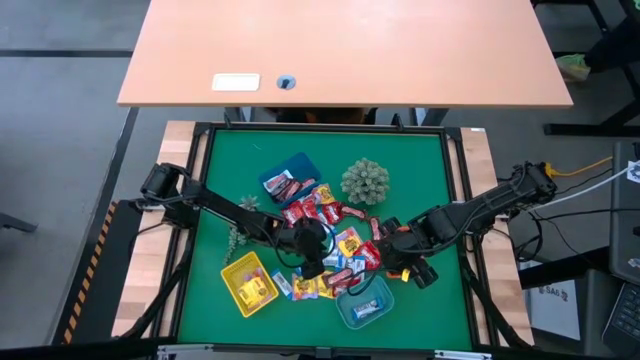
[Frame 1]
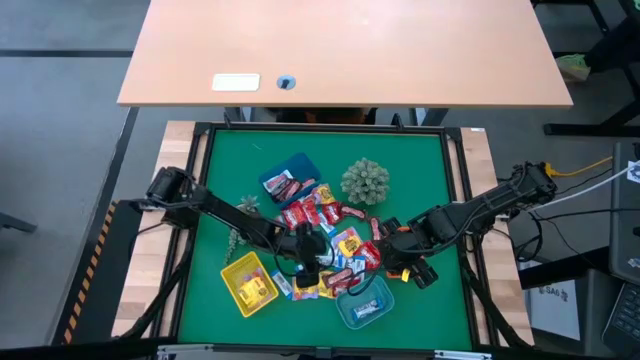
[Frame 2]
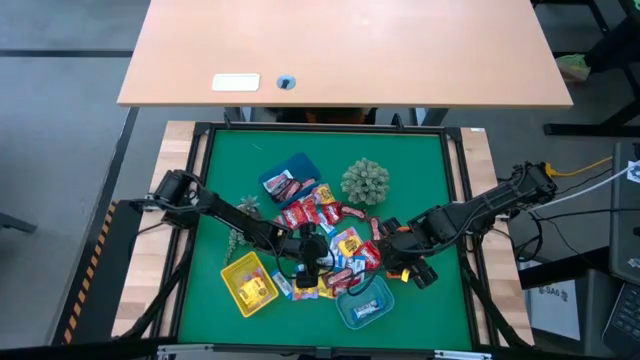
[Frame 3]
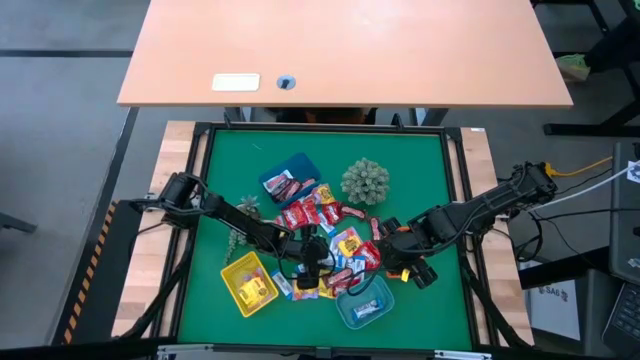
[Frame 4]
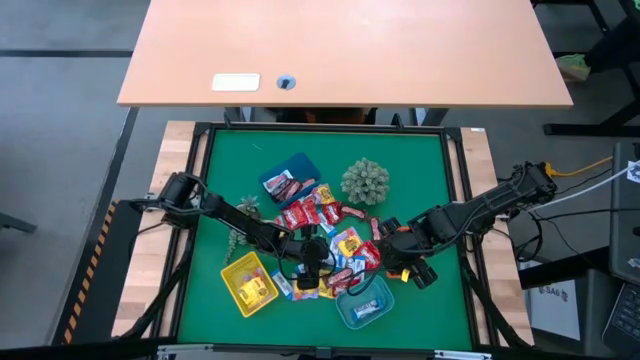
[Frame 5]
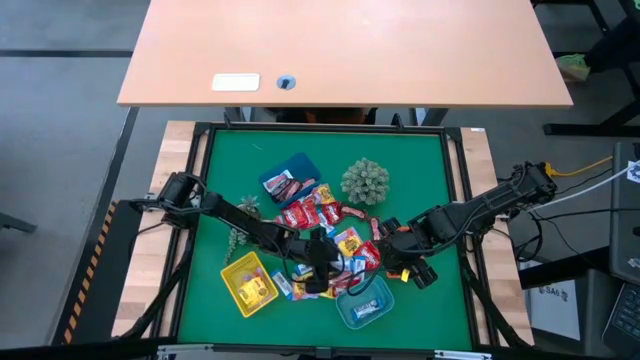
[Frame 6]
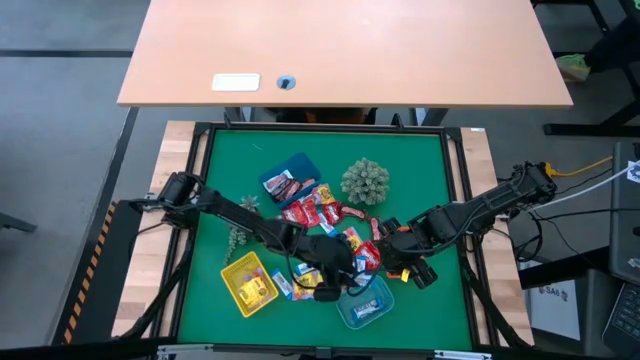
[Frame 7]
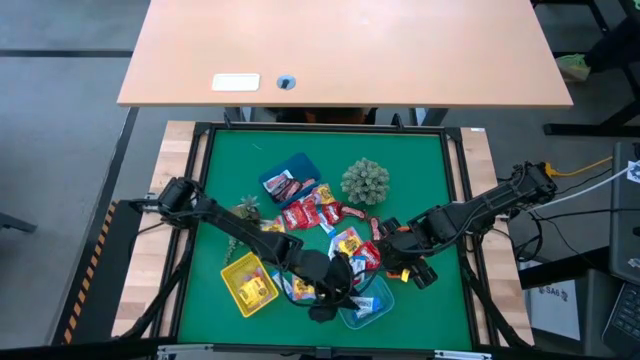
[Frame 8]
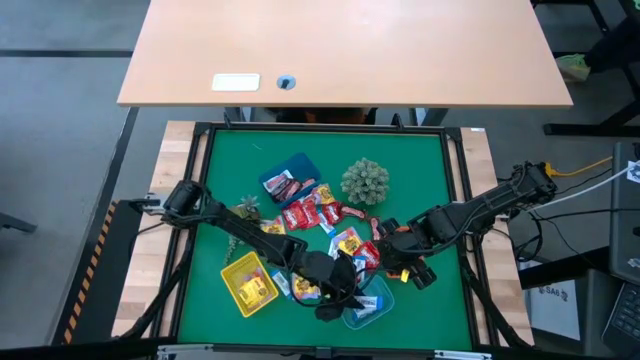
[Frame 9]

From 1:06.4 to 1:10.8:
Task: Sort candy
Put the white-blue chocolate into the light blue bin

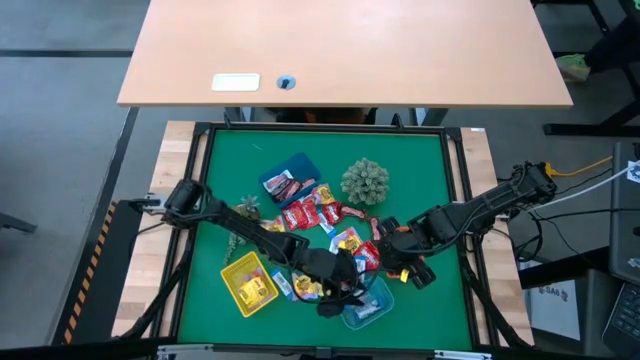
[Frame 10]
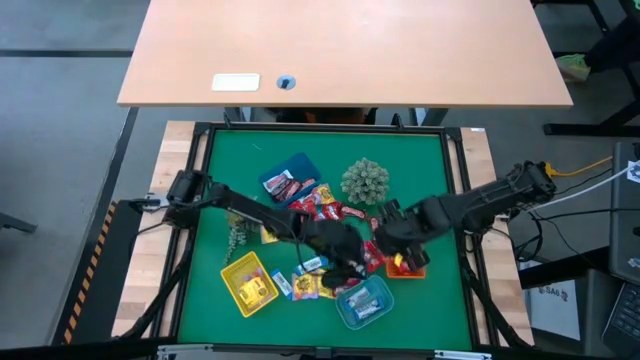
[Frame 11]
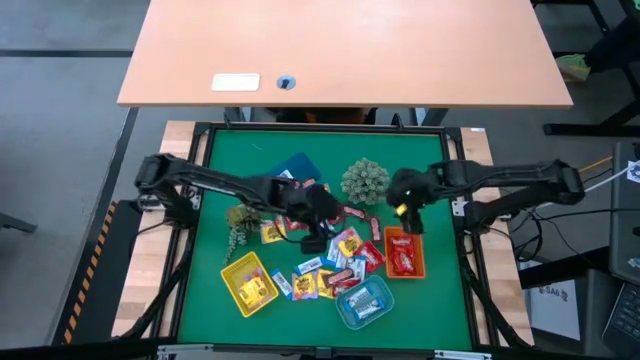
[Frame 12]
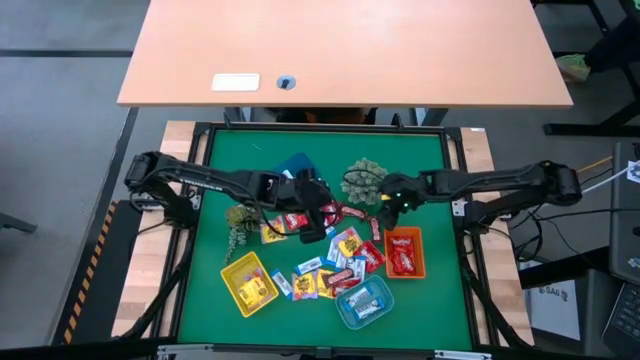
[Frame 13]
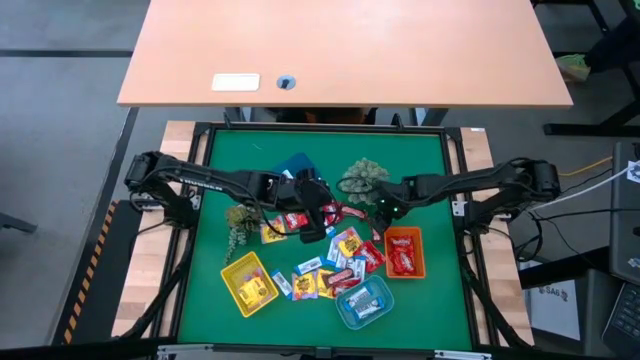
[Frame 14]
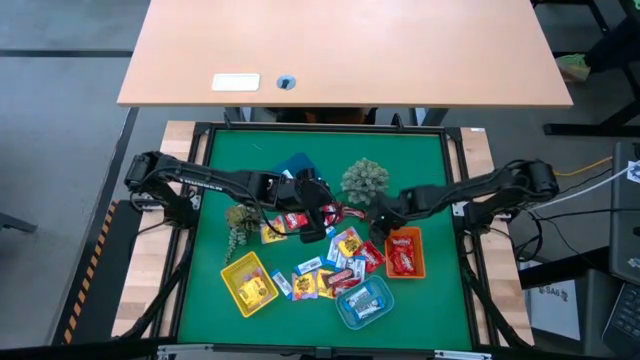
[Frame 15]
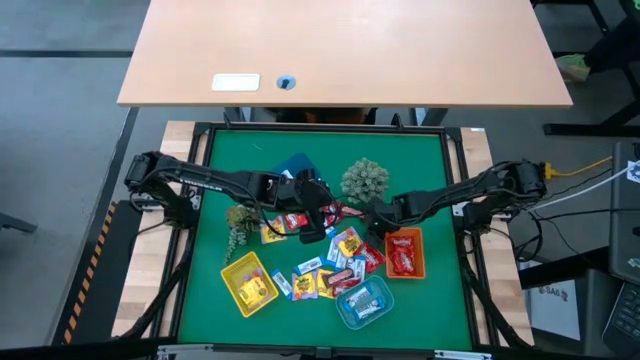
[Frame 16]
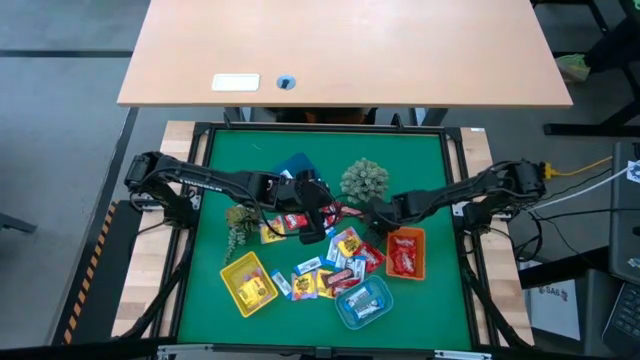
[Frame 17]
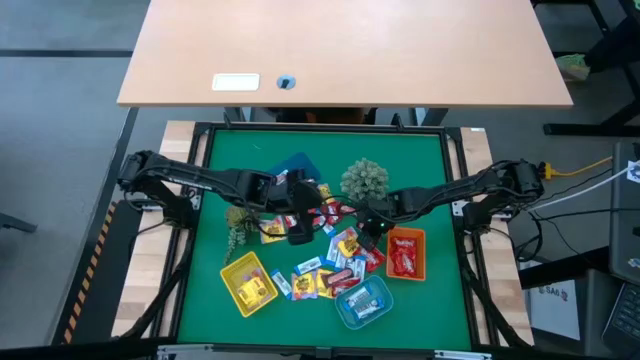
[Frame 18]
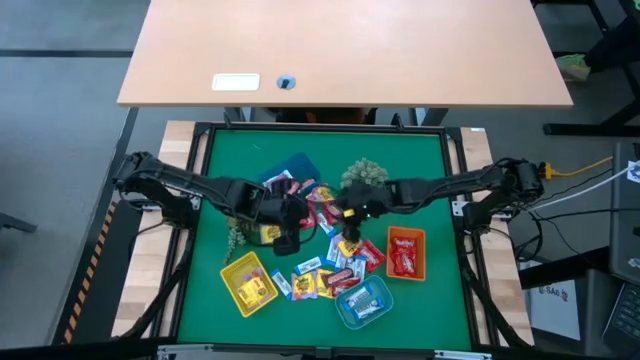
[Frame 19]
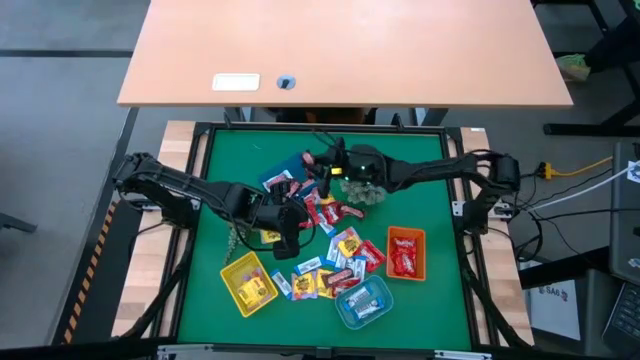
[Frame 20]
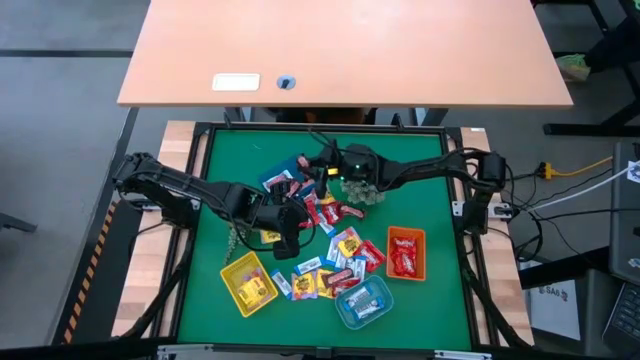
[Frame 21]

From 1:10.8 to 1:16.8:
Put the brown chocolate into the blue bin

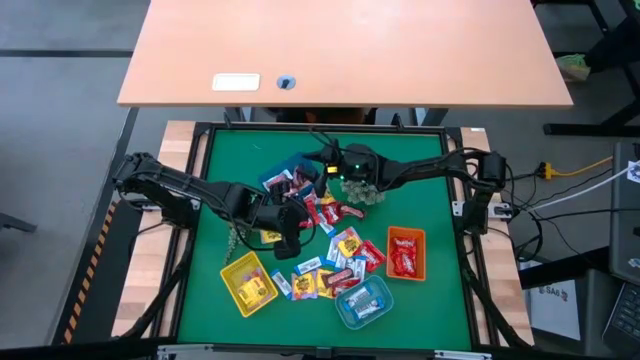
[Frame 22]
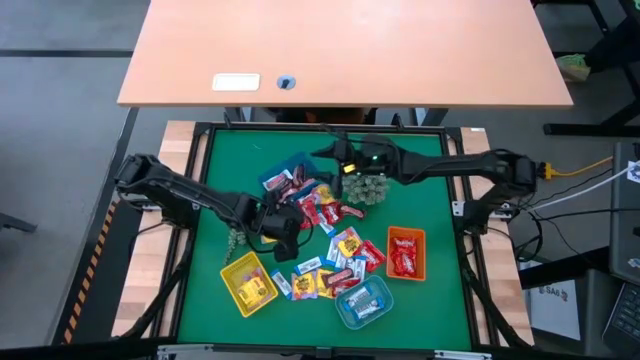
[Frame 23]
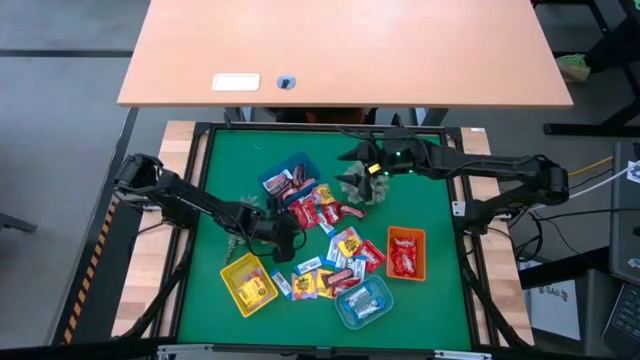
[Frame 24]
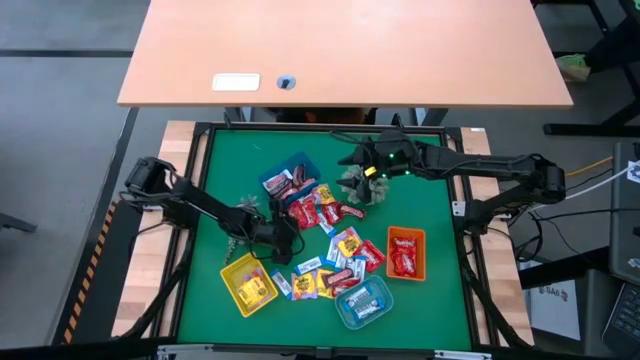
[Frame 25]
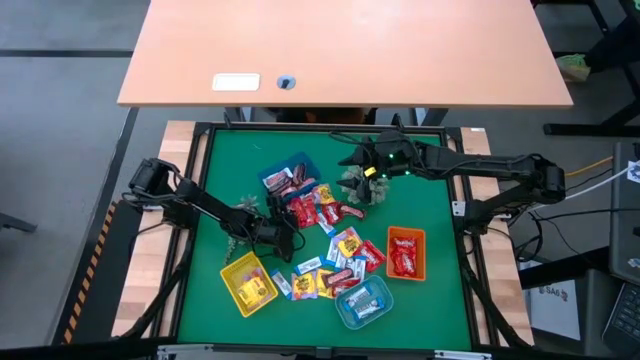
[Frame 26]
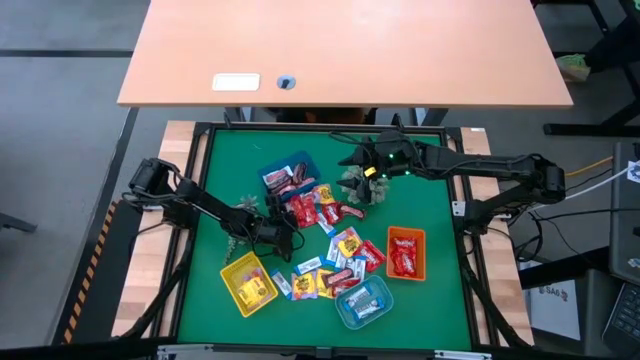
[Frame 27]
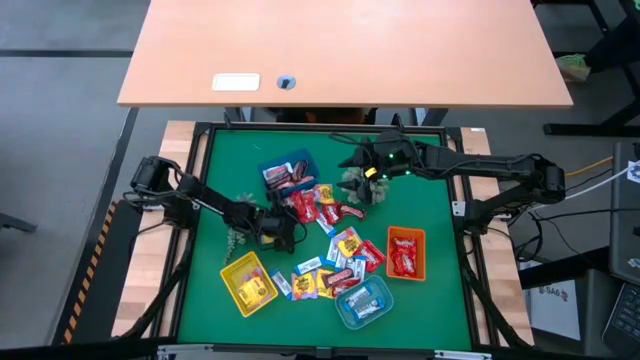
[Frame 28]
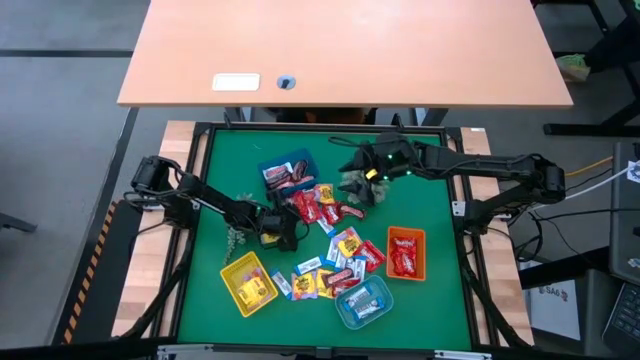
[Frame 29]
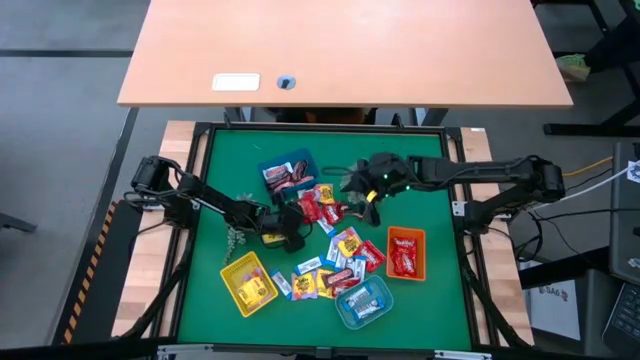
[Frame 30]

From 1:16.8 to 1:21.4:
Put the red candy into the orange bin

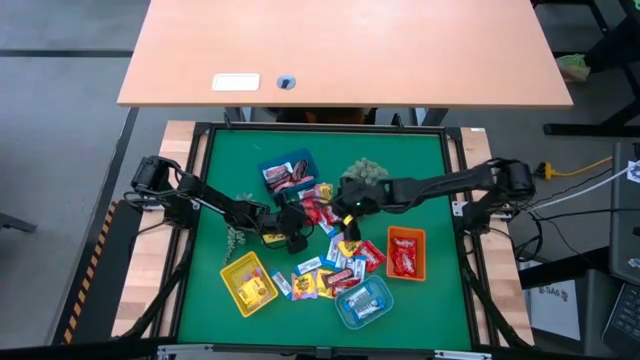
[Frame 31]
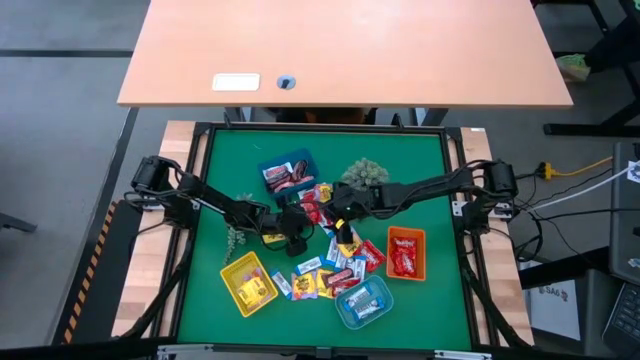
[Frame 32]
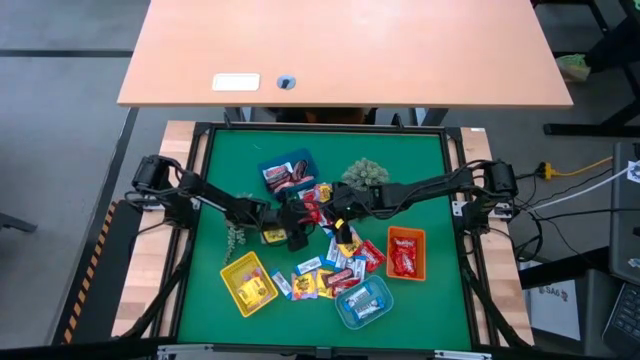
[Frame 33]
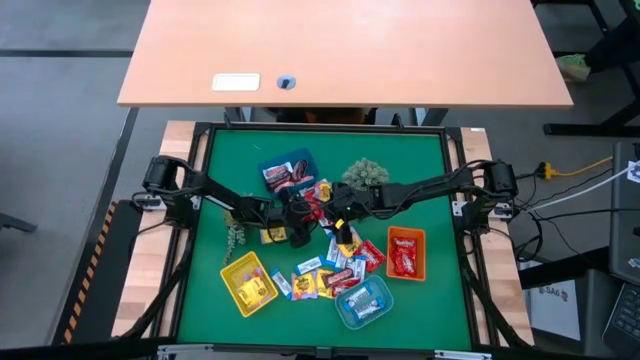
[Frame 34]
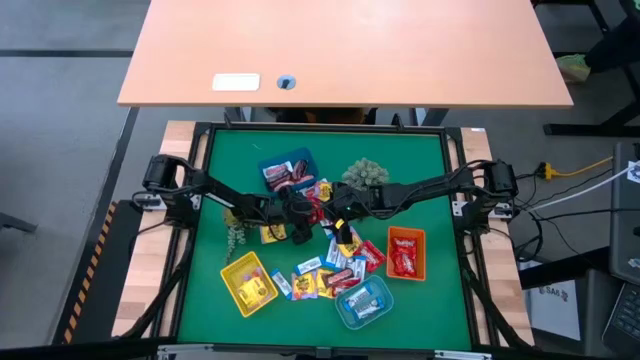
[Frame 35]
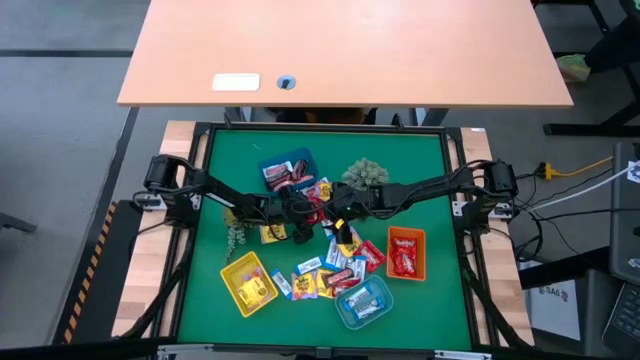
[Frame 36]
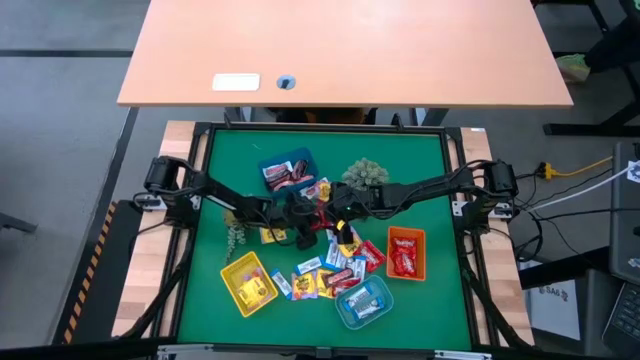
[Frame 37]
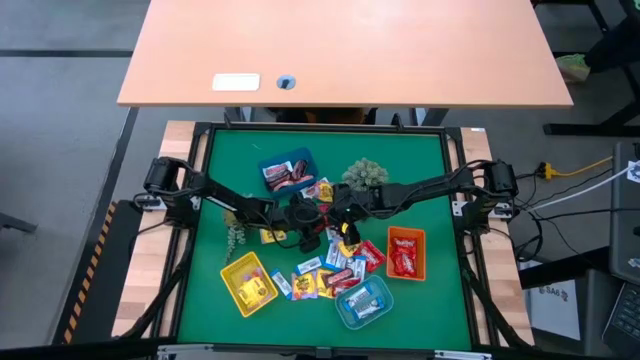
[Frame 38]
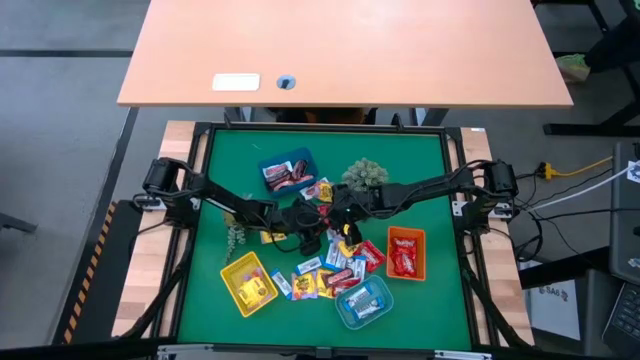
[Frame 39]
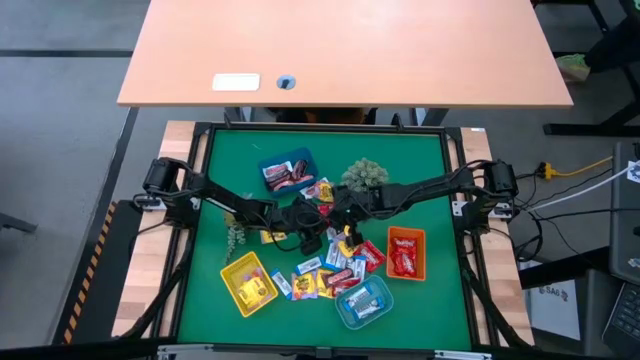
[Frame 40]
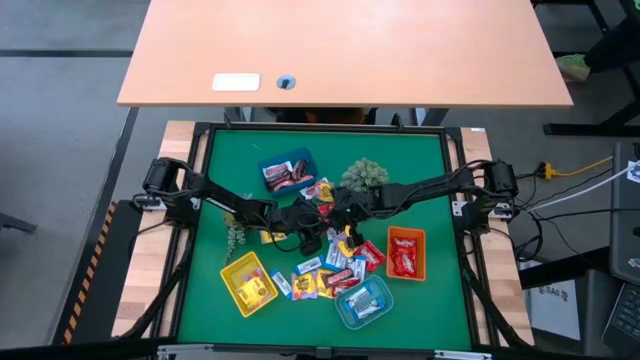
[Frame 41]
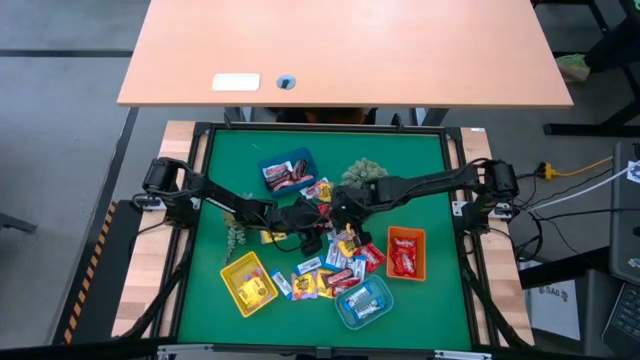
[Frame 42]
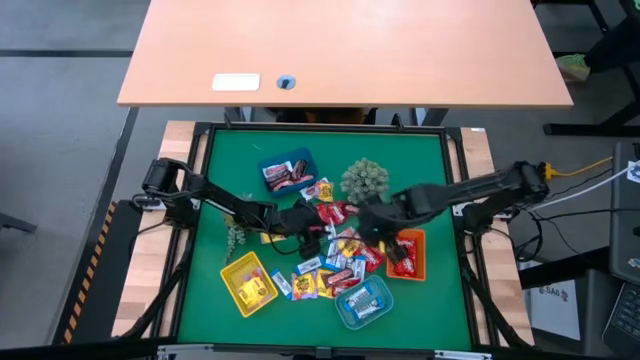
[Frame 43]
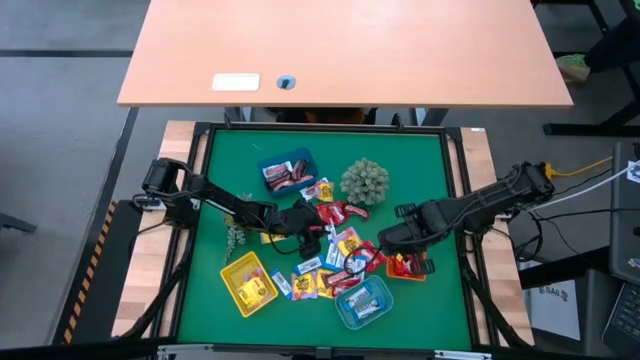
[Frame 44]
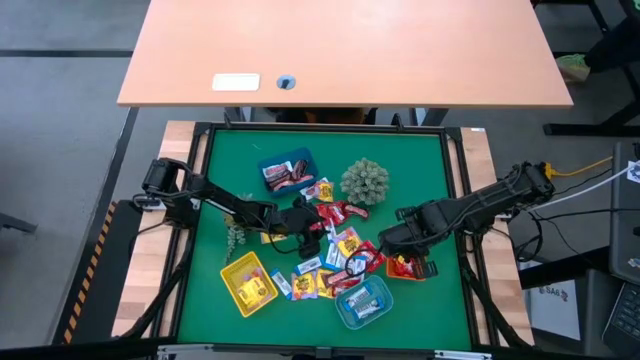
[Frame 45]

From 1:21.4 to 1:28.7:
Put the red candy into the orange bin
